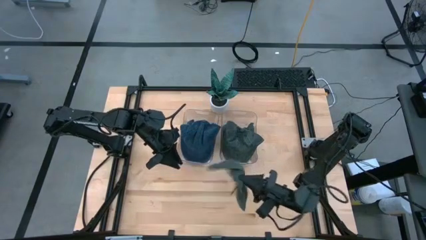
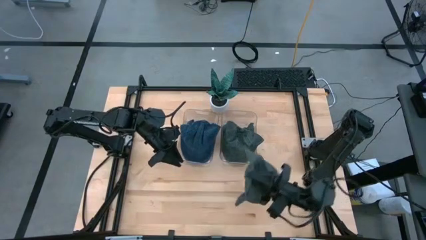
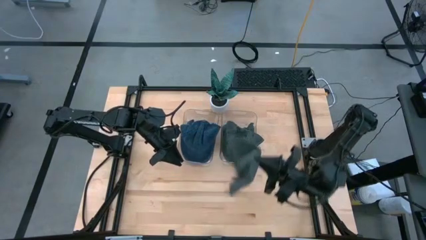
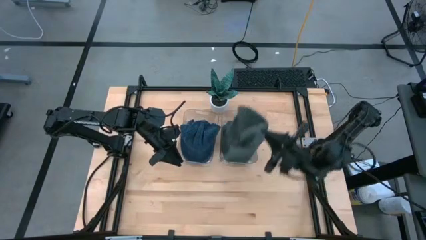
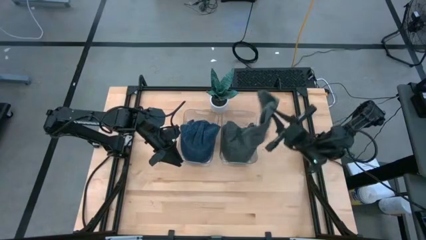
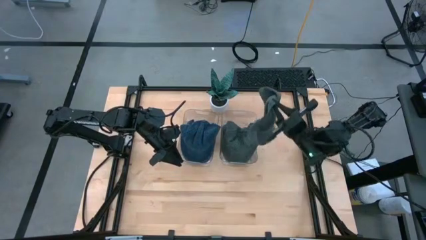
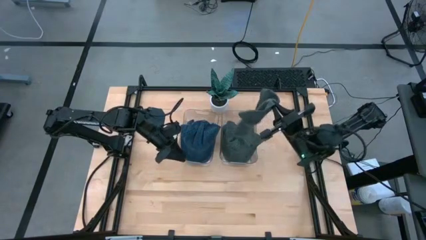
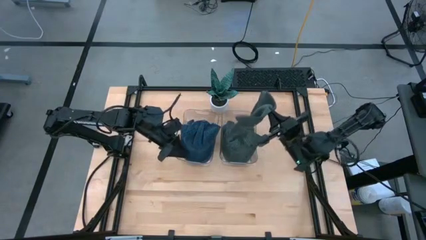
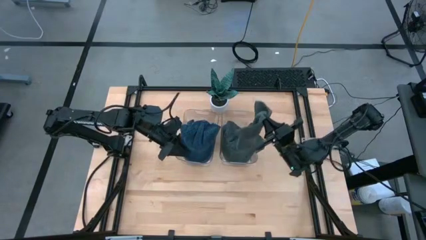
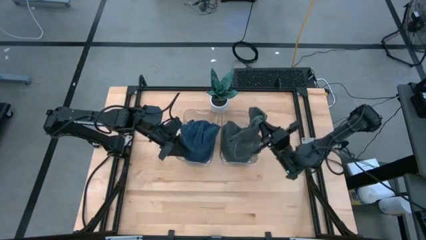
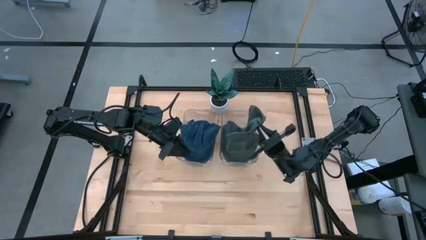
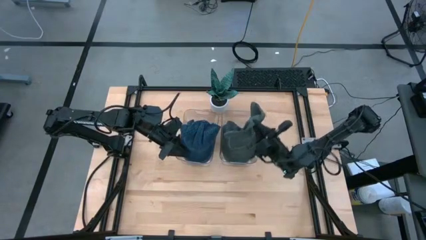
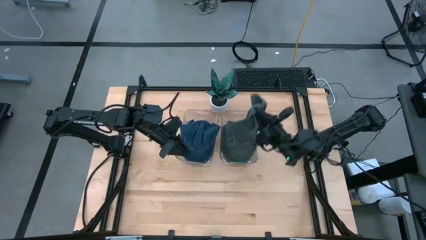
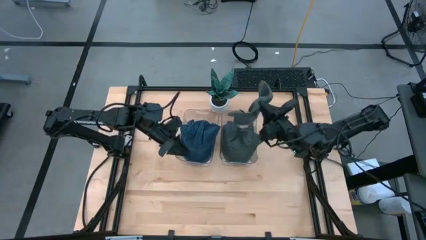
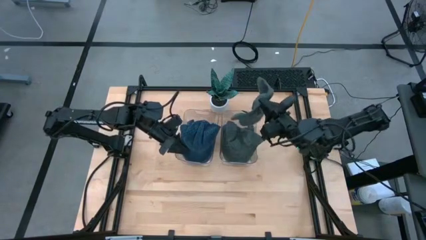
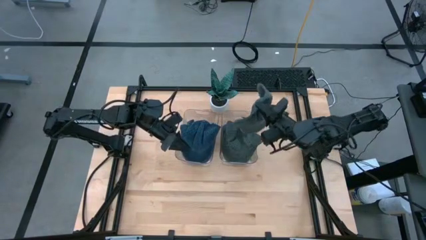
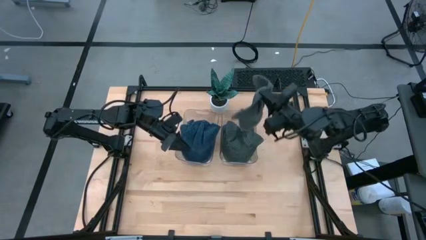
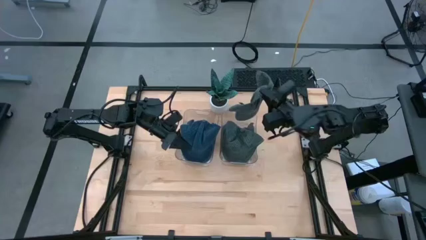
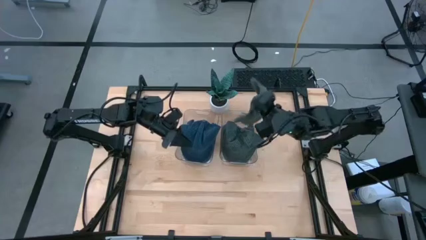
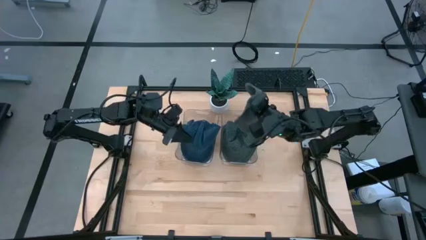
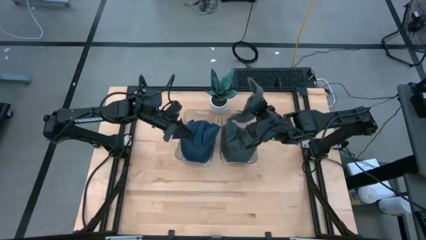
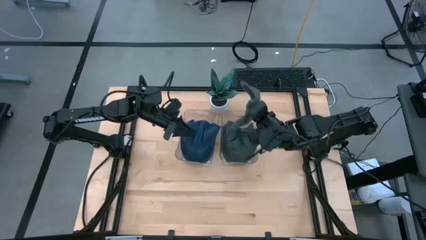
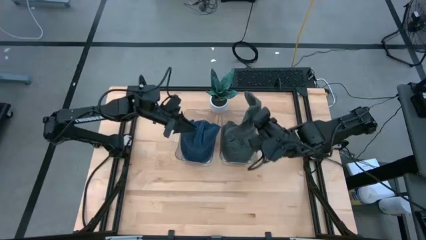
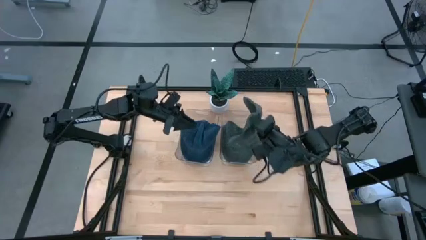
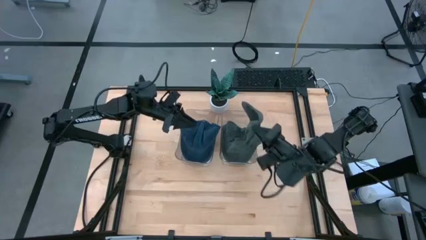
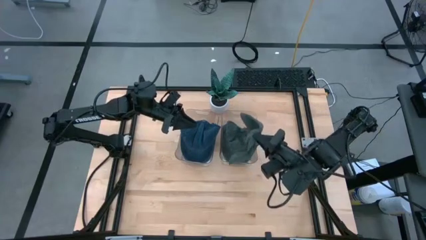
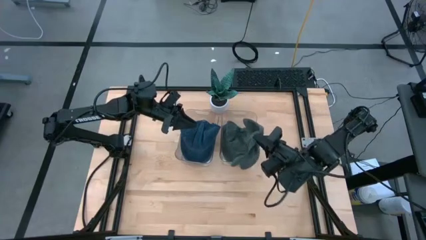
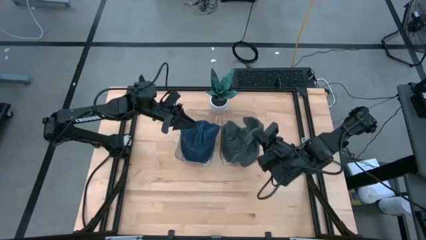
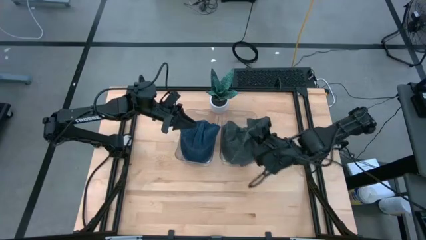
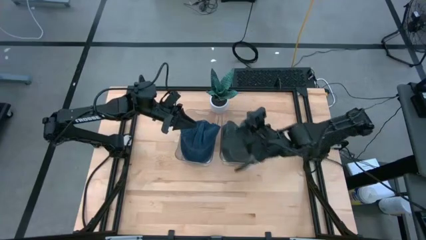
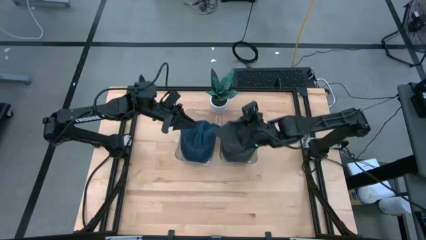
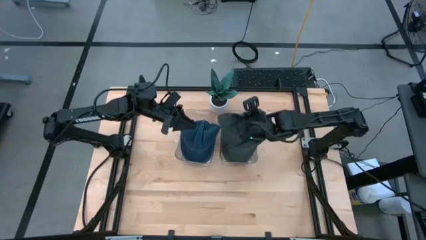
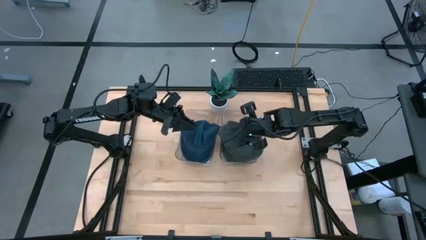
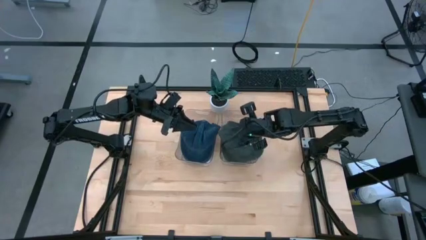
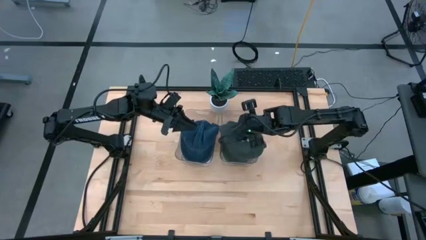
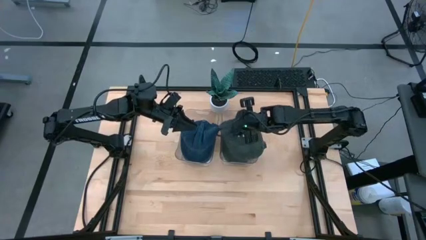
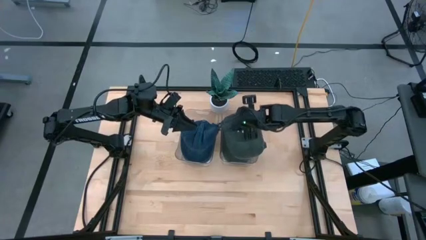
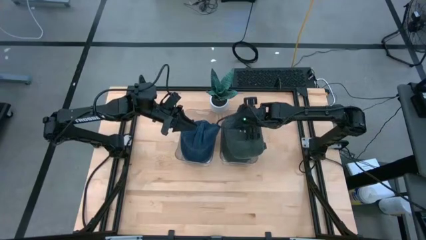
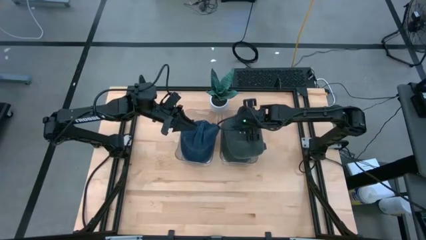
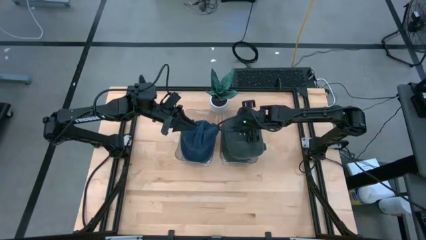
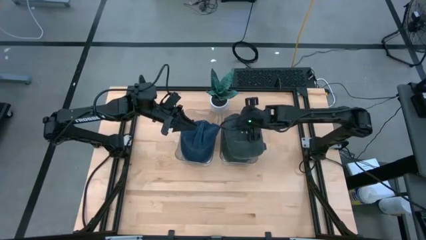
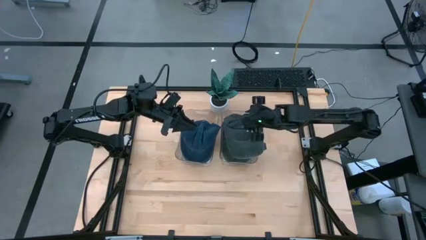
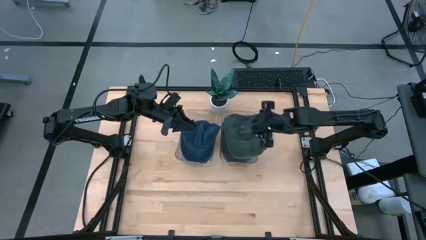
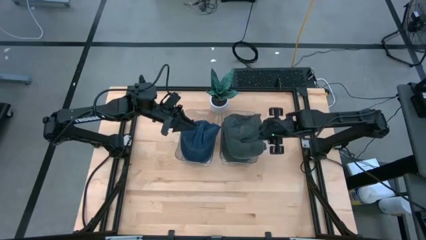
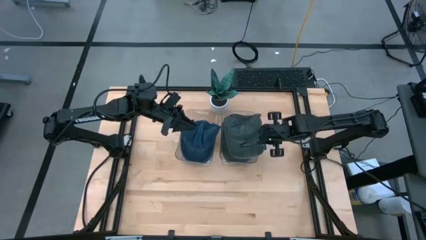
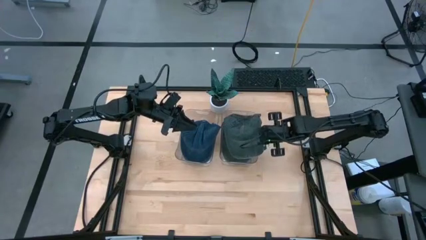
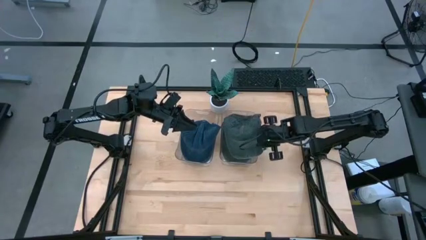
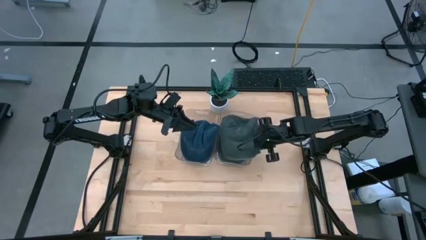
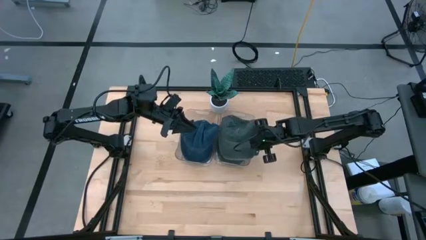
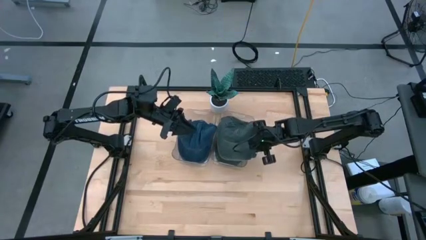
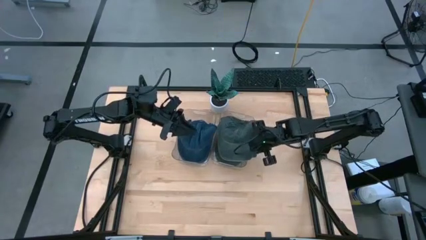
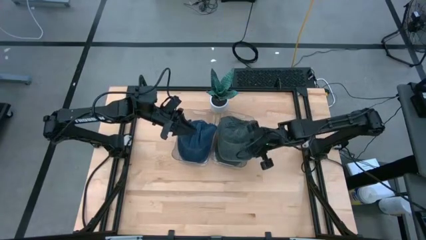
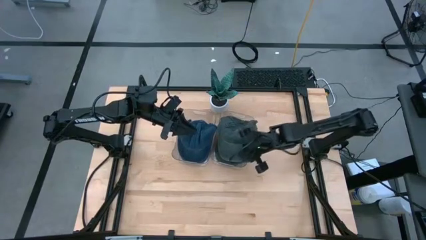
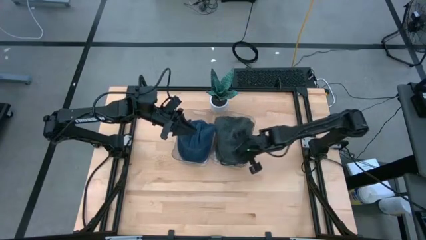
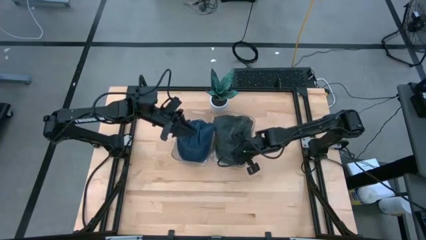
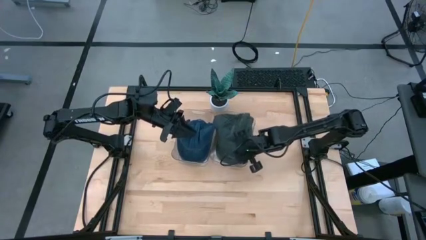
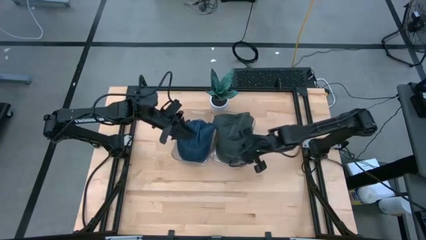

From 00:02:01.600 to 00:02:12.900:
Task: Pick & Place hat
Put the gray cap into the right transparent bin

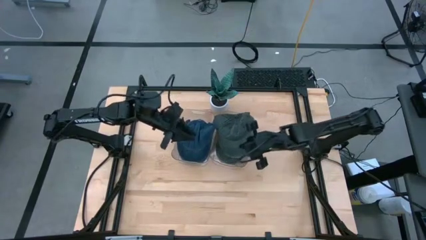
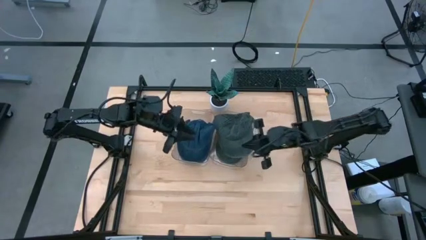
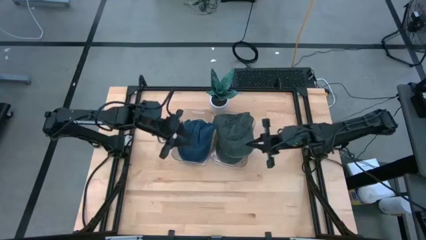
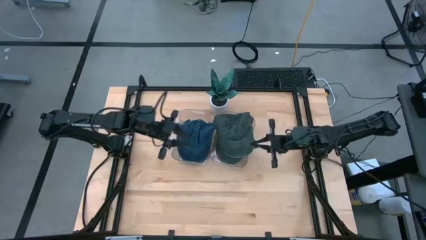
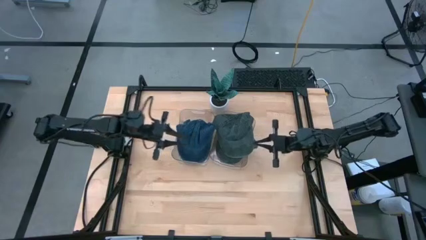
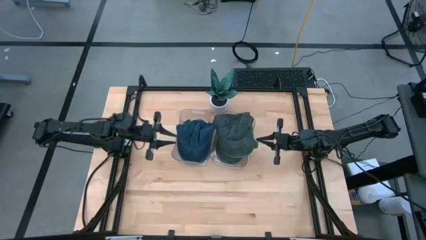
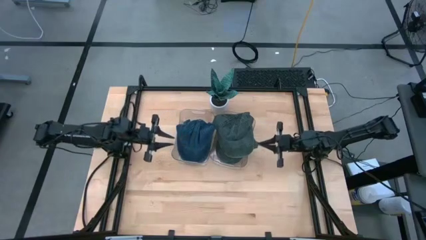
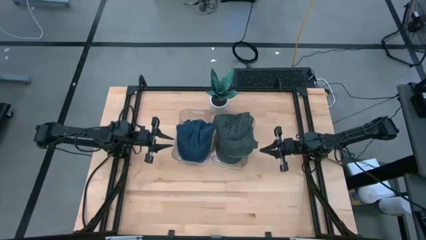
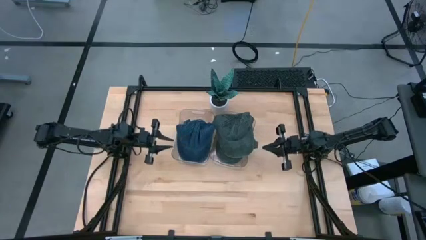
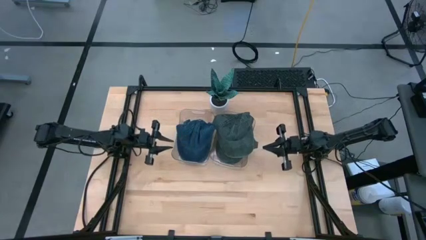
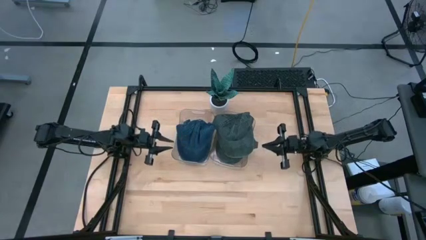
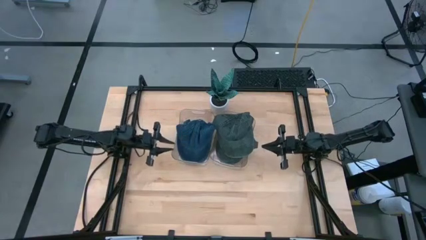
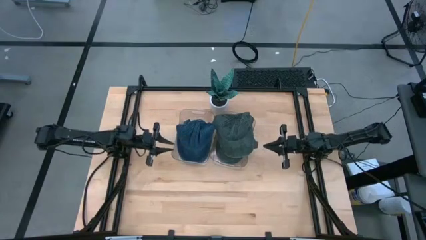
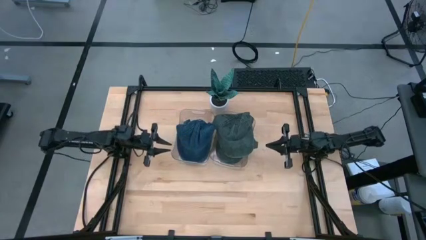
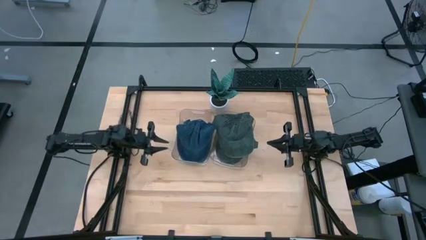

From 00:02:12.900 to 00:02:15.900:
Return to Home Position

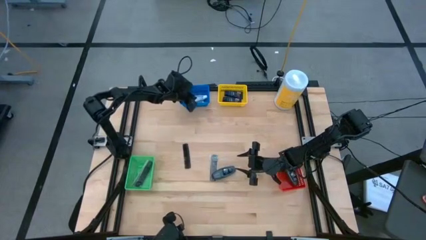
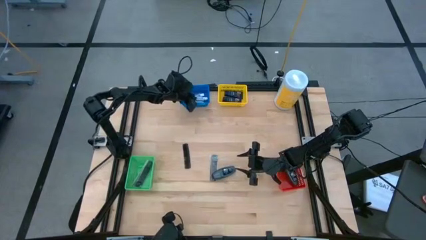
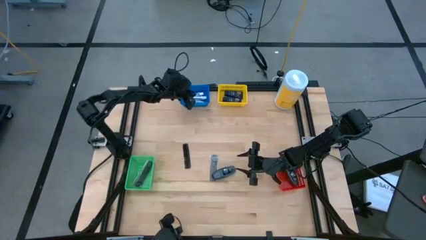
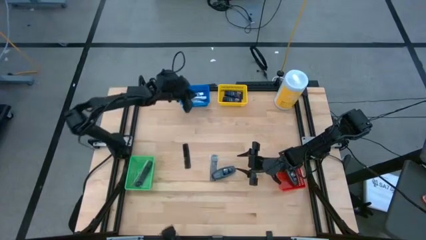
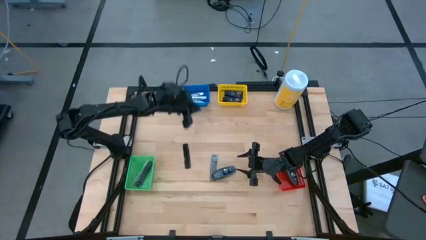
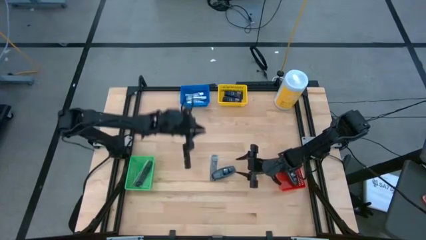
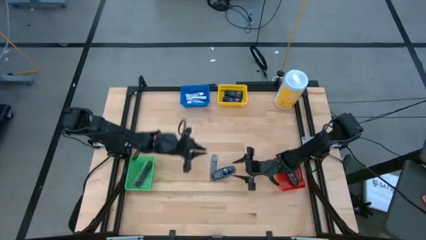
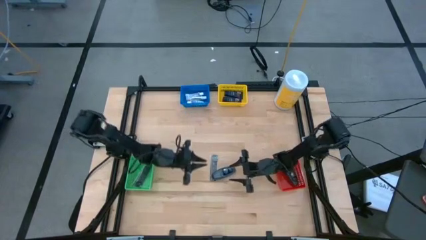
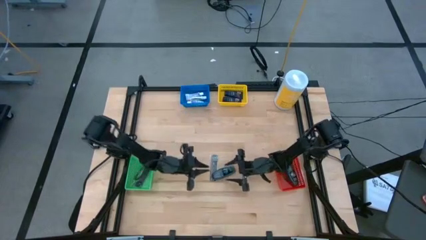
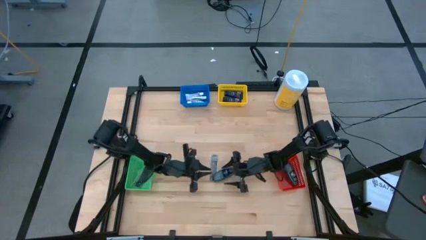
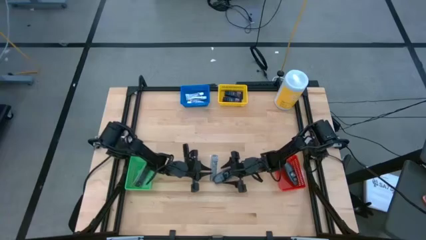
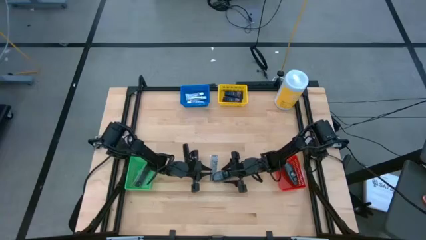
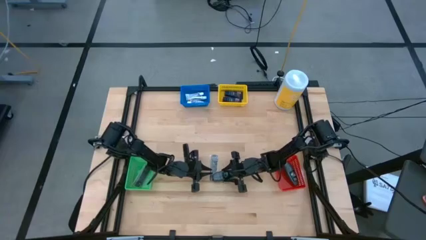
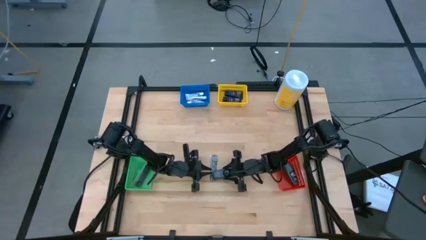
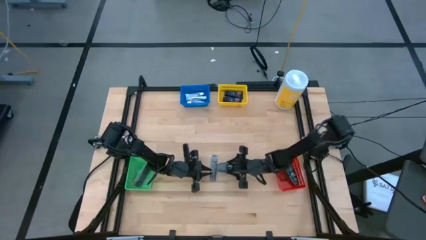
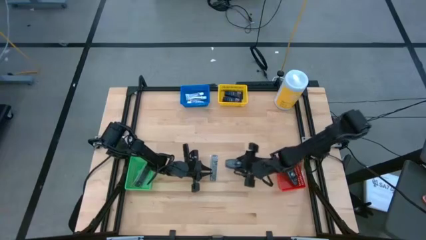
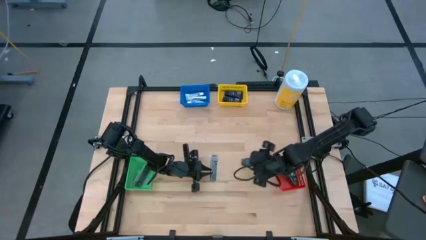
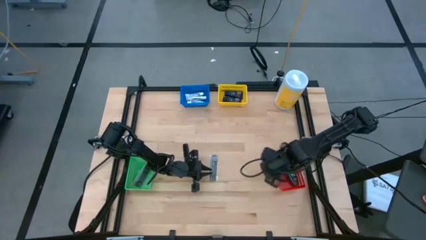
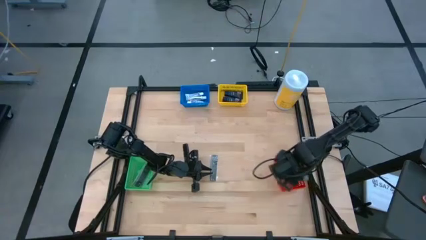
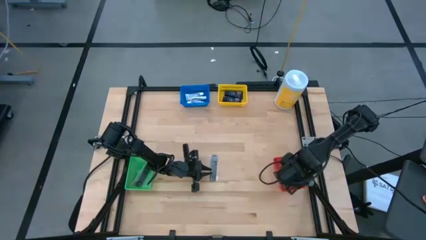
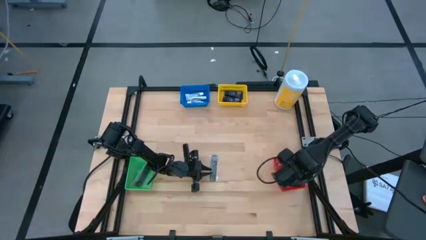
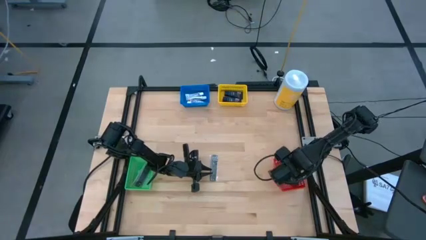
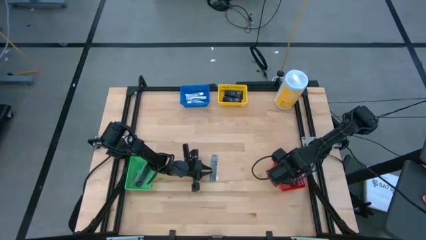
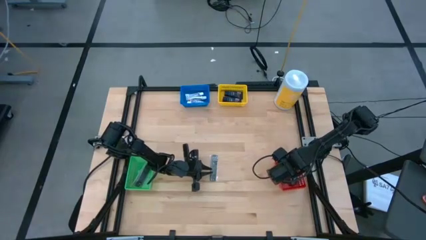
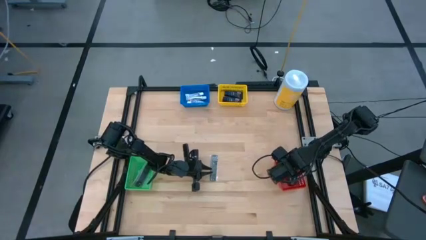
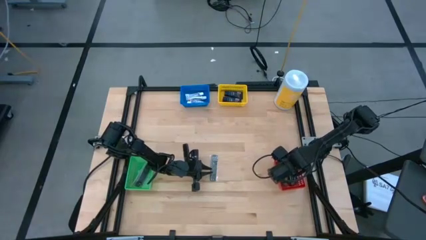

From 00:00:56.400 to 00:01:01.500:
Task: Pick & Place Travel size toiletries
Put the black deodorant into the red bin
